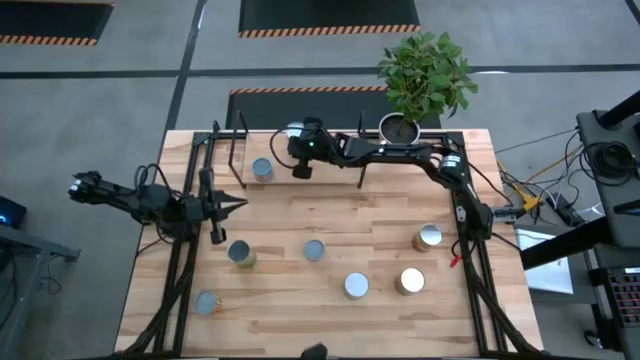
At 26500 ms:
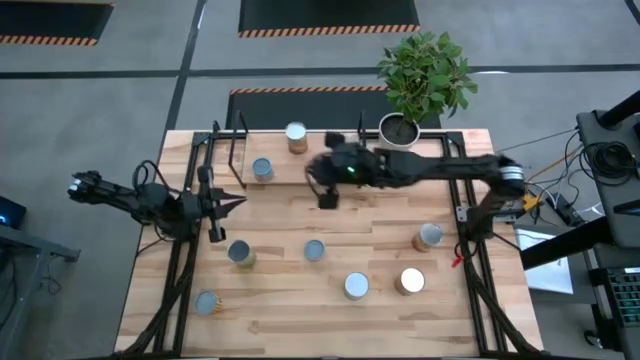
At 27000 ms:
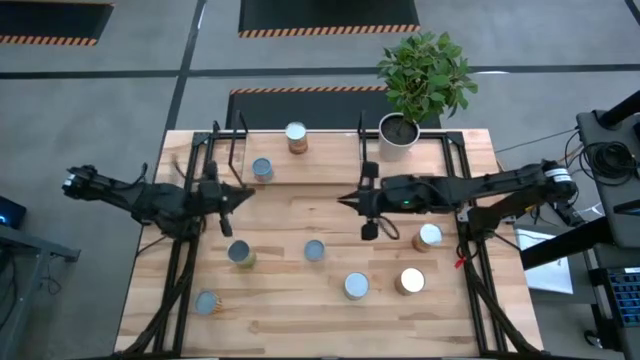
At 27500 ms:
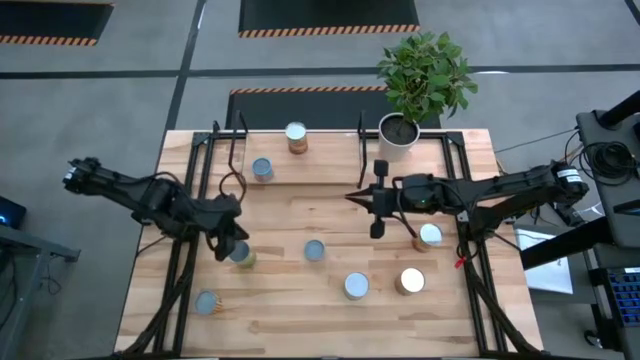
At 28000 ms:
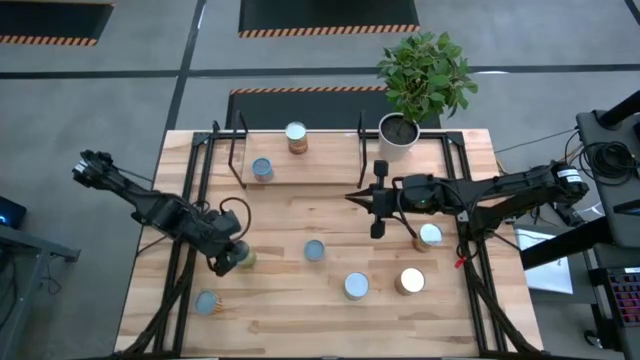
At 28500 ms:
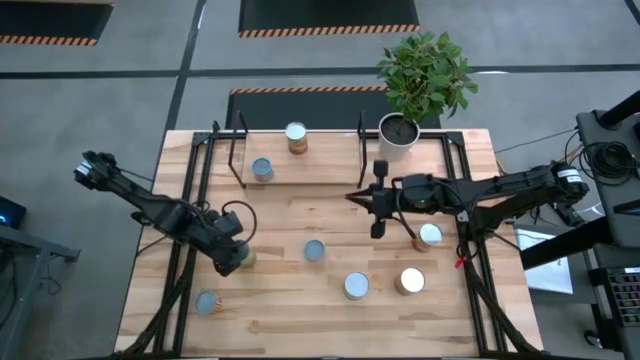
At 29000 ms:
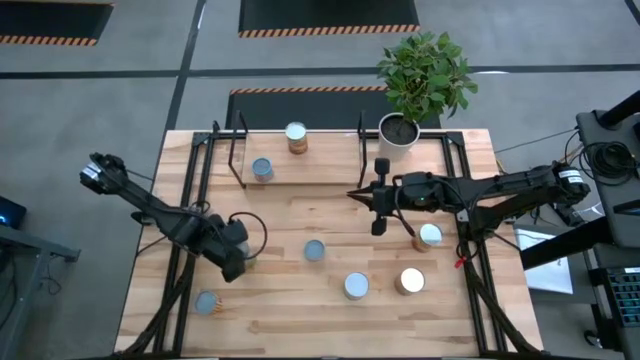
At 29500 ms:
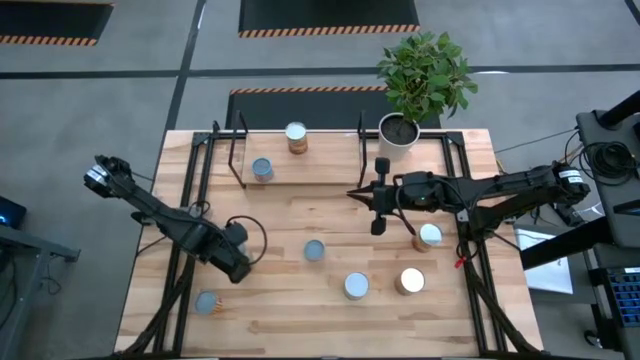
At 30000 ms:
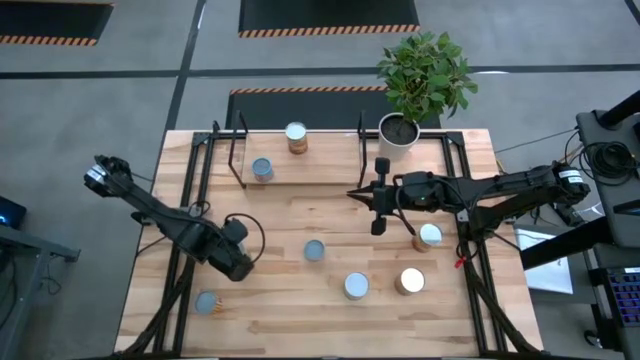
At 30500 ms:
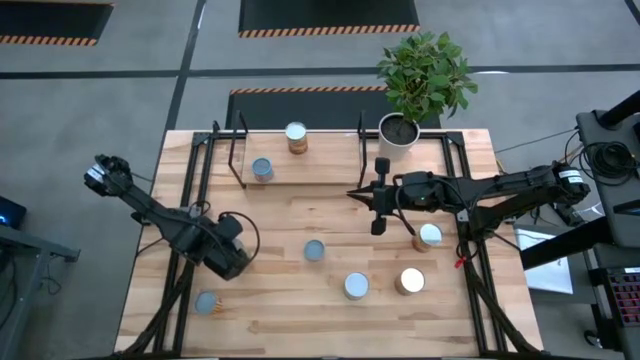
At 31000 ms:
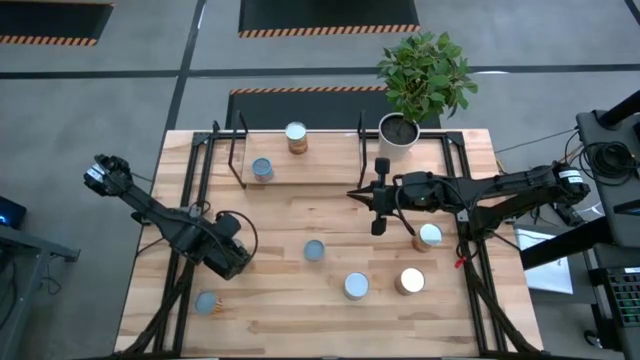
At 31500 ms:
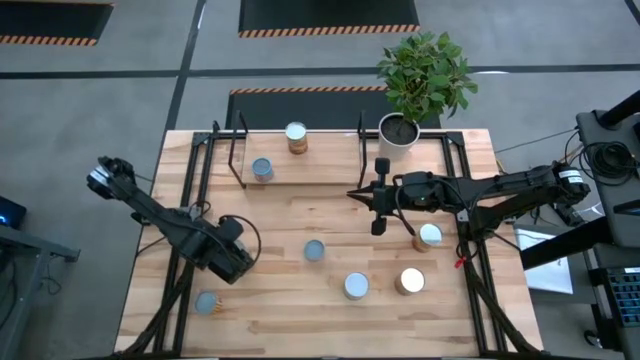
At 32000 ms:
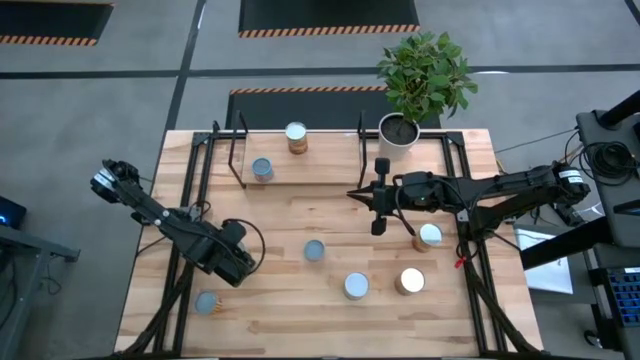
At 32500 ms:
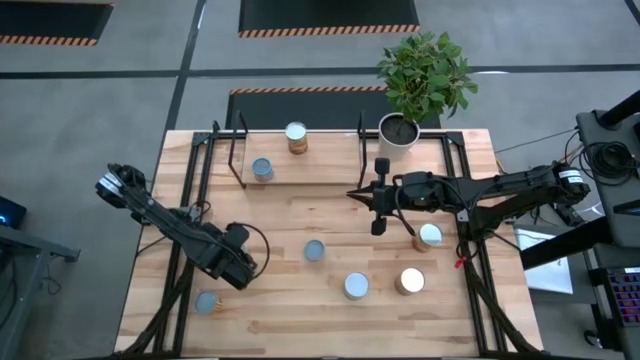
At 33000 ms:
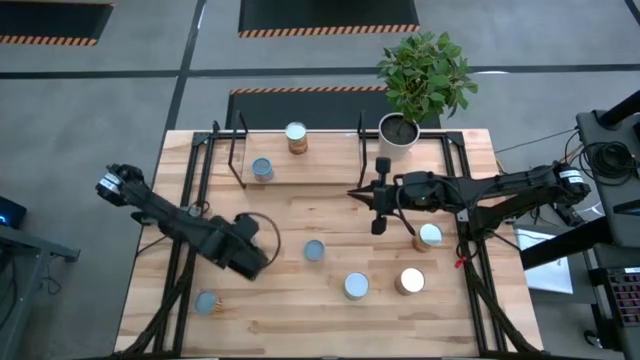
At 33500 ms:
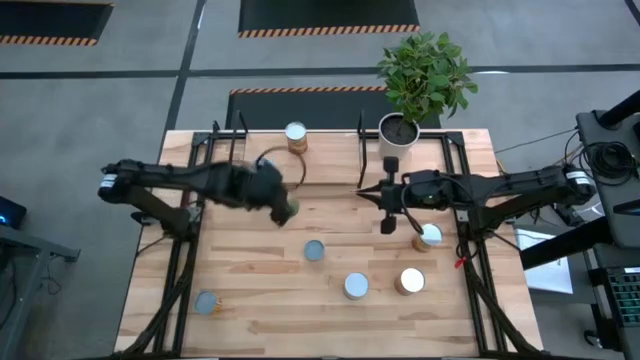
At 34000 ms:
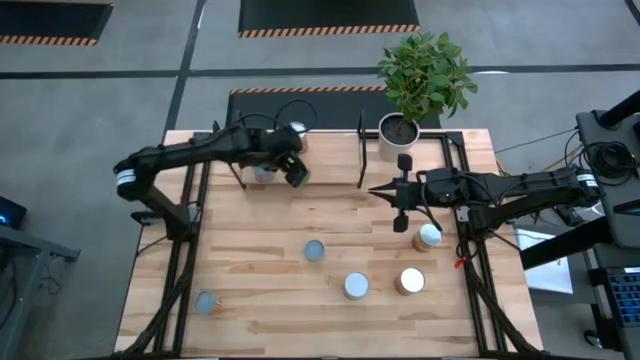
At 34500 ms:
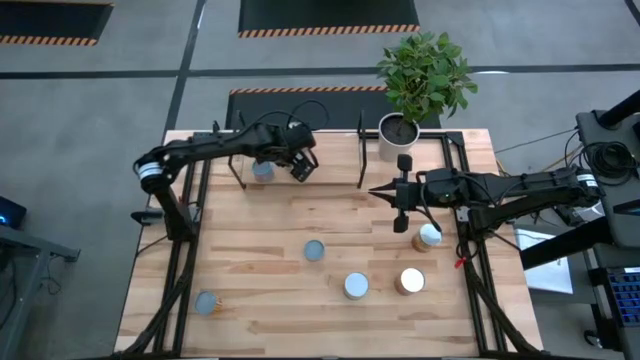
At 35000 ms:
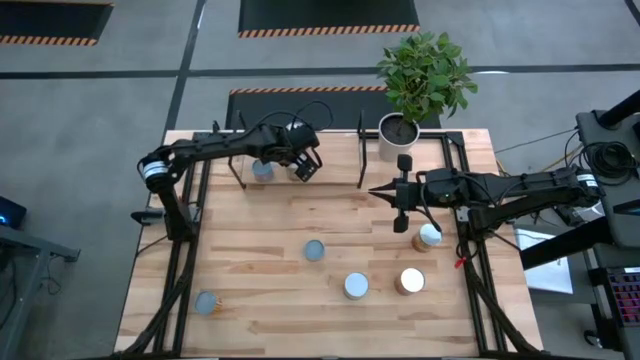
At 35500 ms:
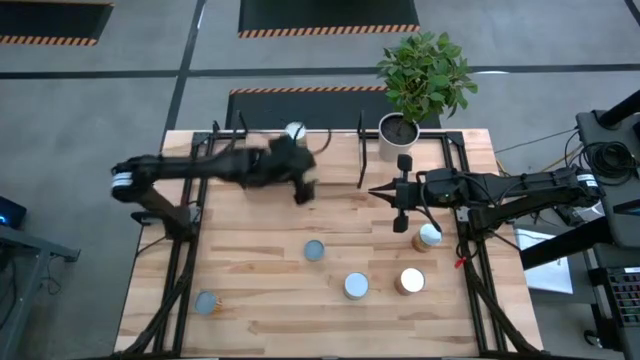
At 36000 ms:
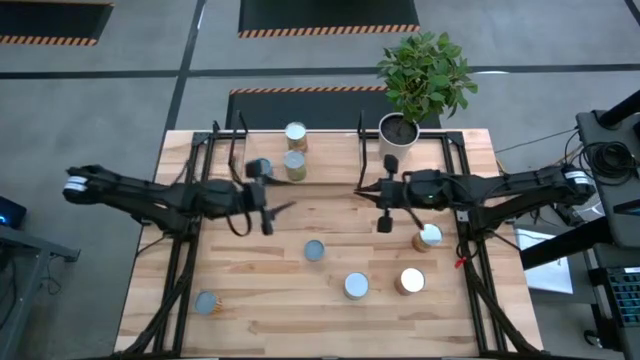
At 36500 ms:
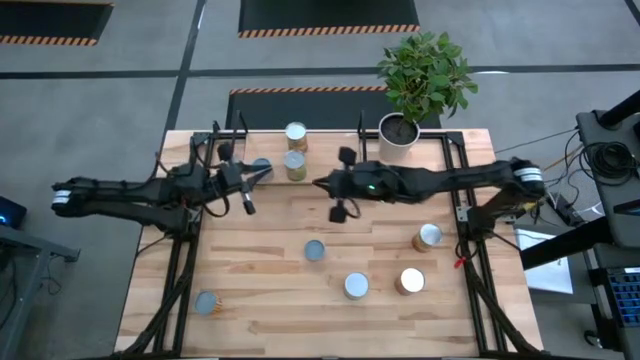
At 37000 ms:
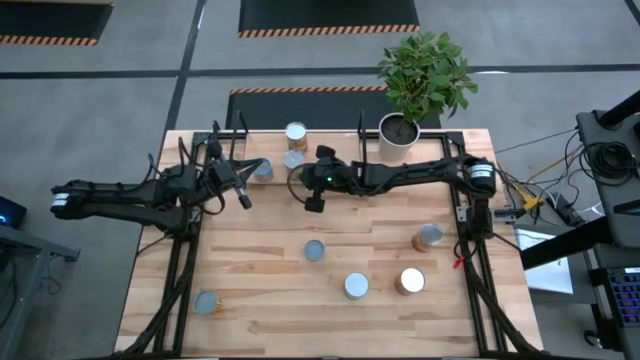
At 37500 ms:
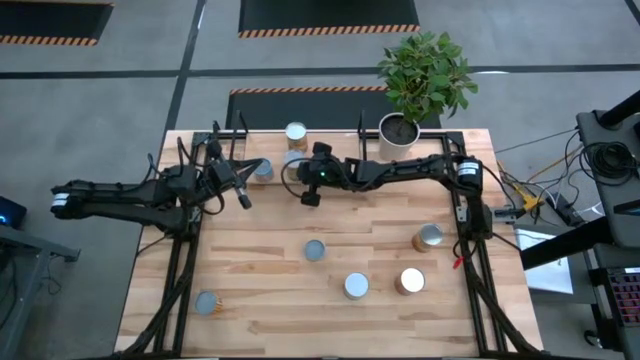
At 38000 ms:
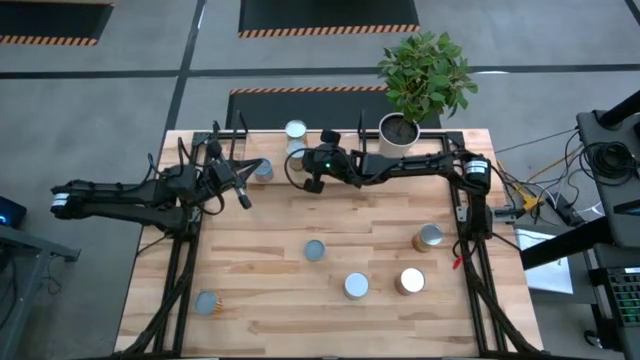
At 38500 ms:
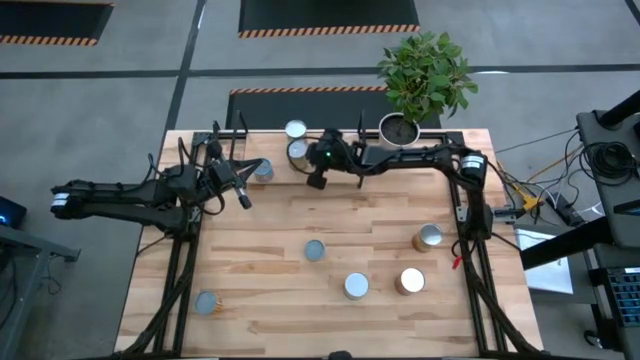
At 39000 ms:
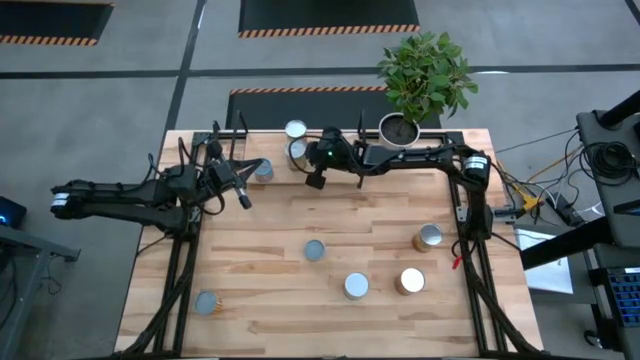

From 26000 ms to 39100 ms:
Task: Pick and place cans onto a shelf
Put the canned oranges on the shelf

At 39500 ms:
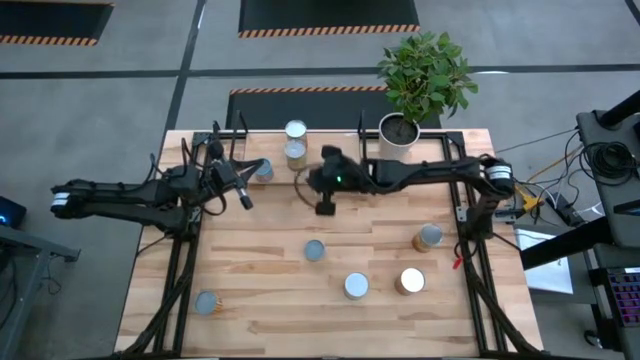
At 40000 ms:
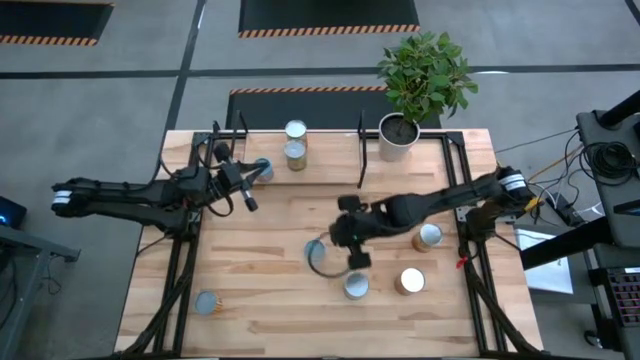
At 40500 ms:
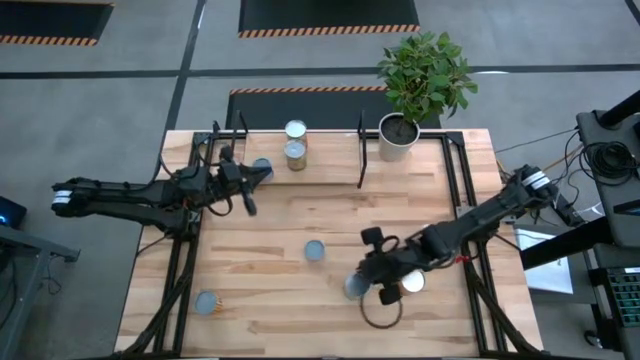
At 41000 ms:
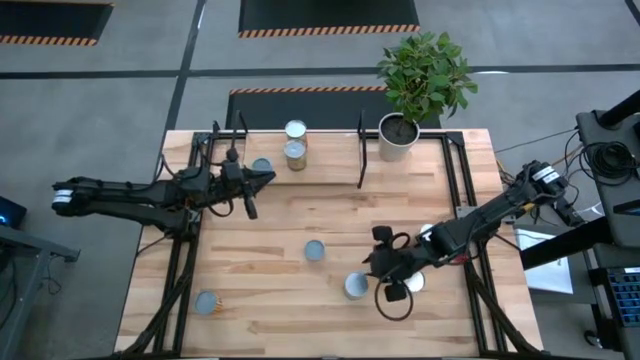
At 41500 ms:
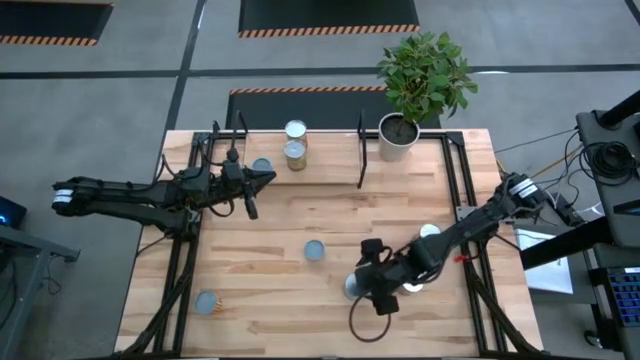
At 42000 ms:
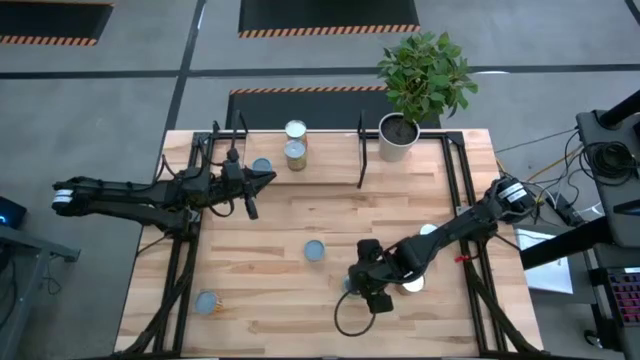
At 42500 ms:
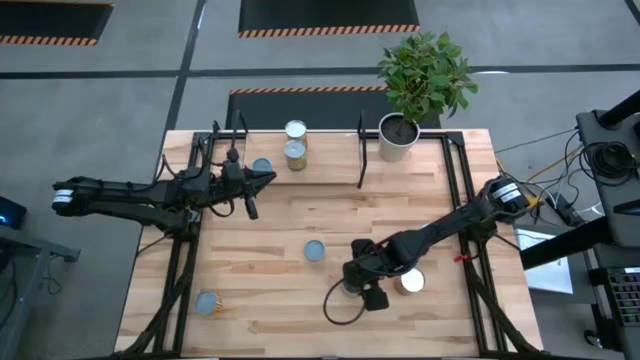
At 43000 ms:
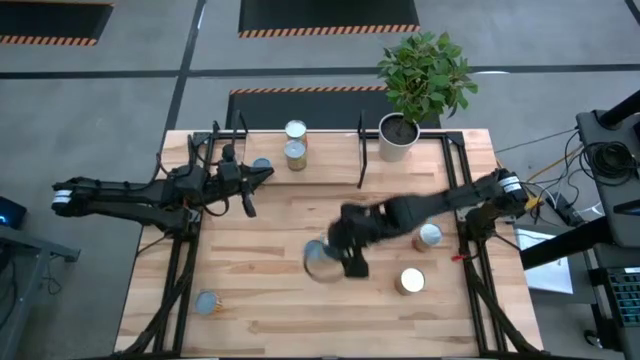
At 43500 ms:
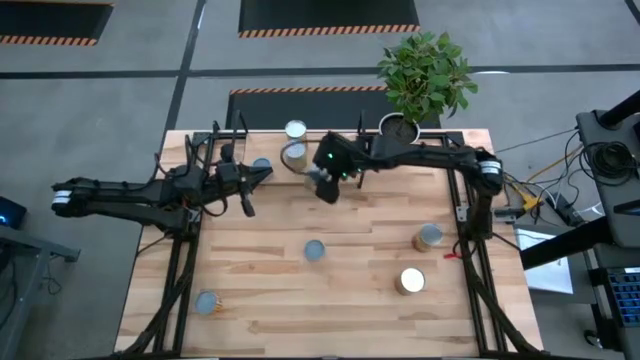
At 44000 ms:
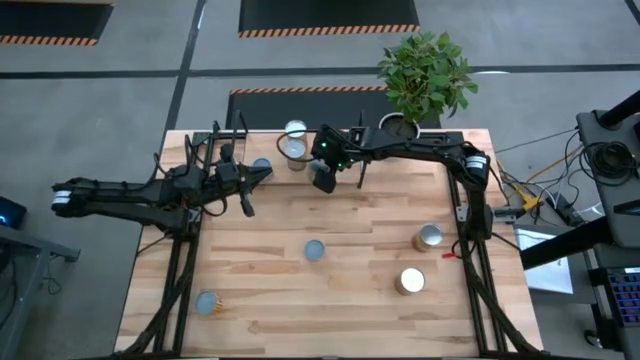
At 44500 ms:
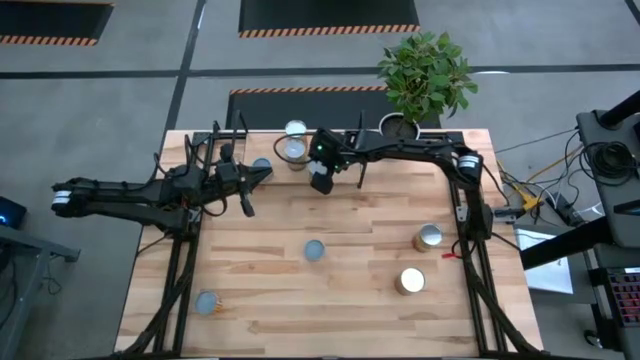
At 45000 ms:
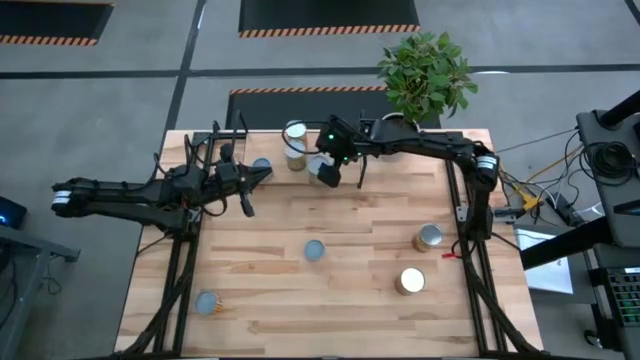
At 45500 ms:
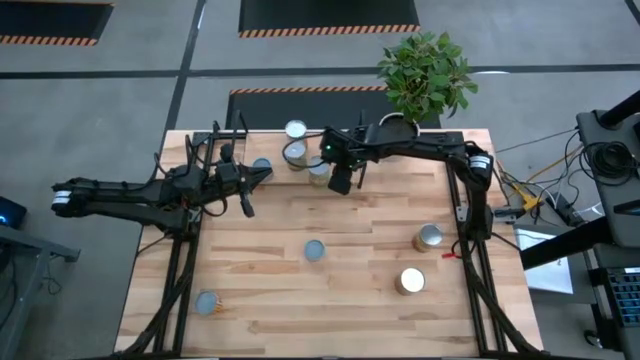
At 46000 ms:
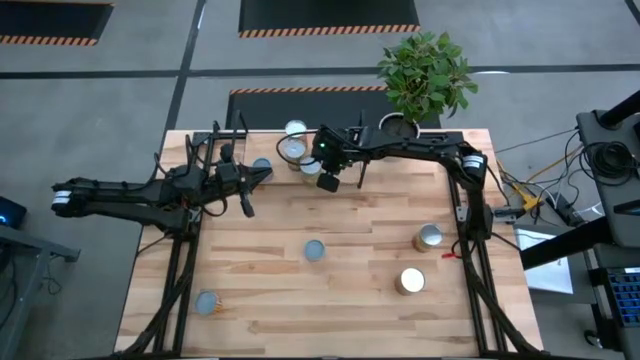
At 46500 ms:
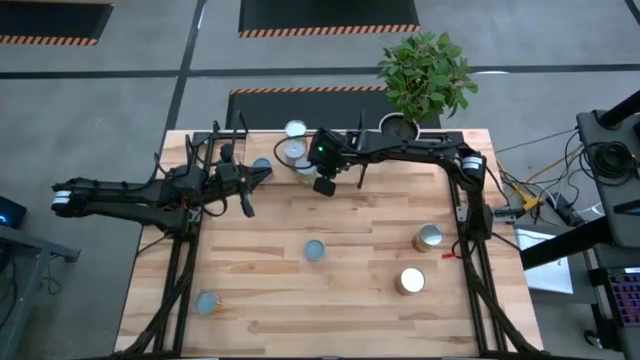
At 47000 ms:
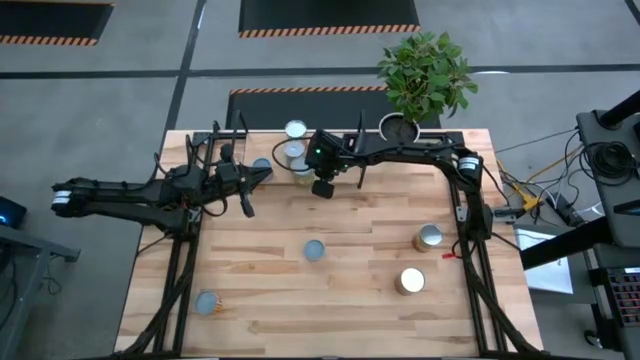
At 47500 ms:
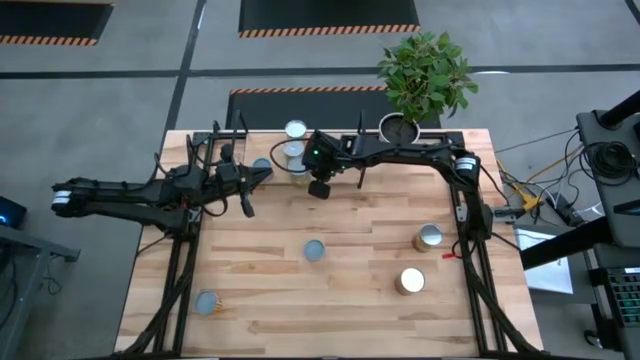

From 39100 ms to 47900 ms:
Put the canned pears on the shelf
